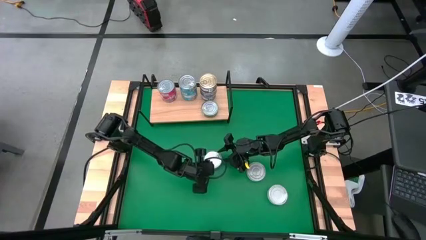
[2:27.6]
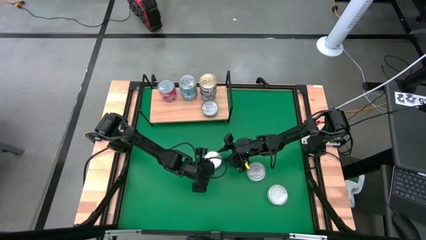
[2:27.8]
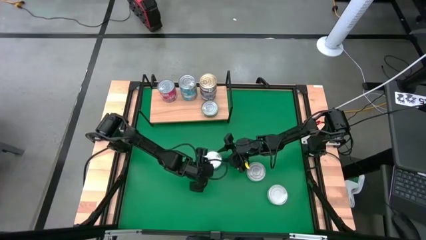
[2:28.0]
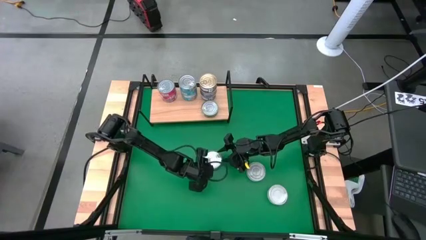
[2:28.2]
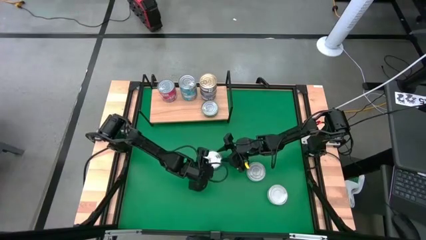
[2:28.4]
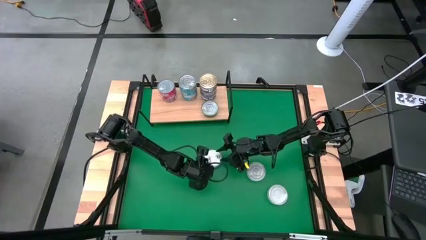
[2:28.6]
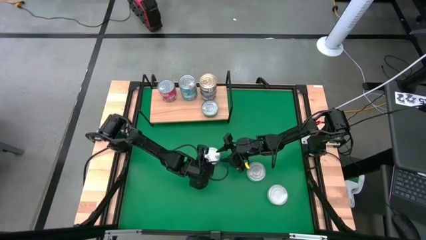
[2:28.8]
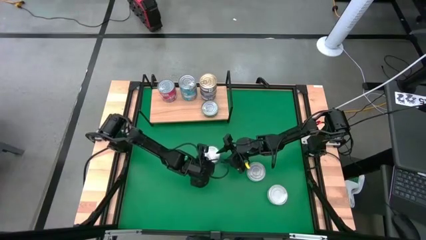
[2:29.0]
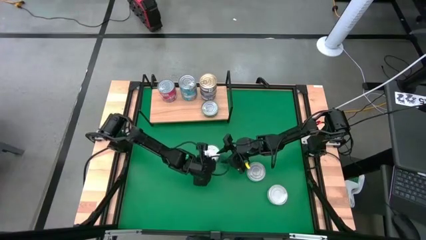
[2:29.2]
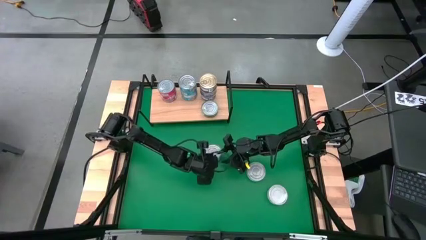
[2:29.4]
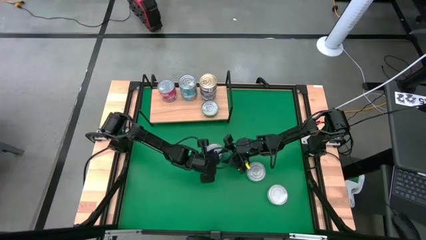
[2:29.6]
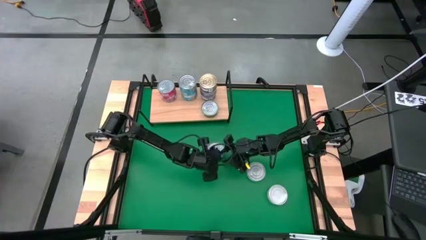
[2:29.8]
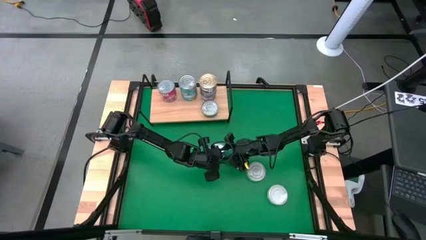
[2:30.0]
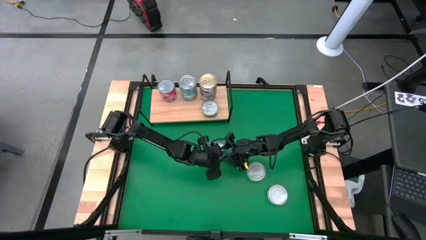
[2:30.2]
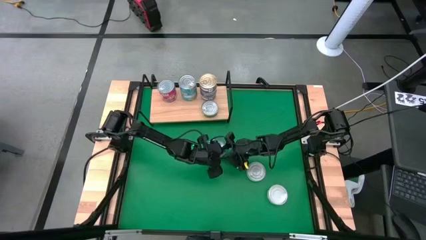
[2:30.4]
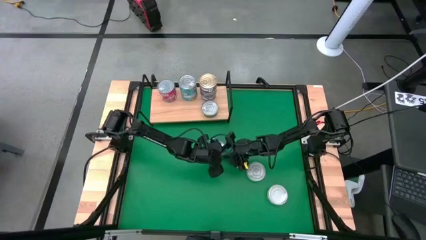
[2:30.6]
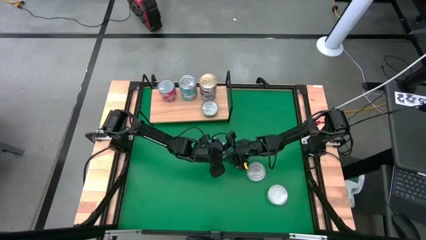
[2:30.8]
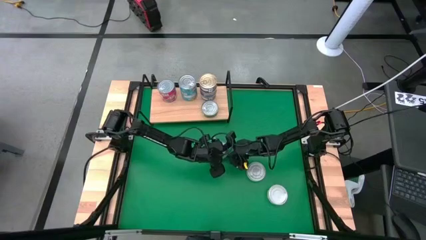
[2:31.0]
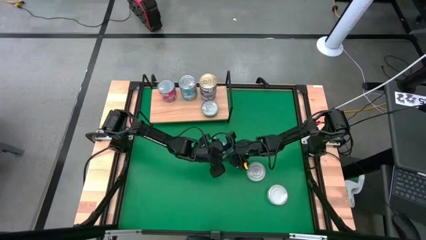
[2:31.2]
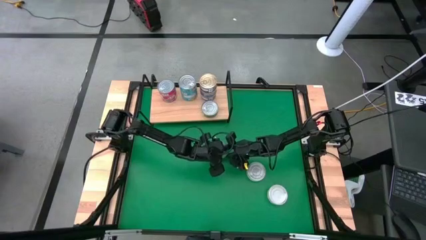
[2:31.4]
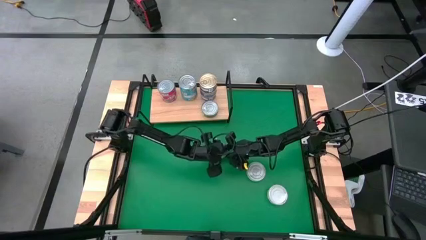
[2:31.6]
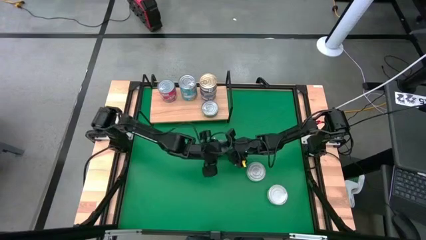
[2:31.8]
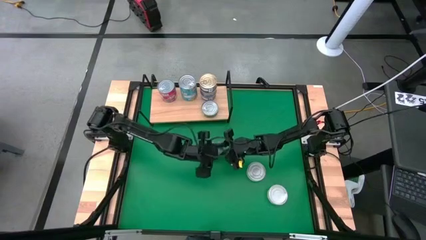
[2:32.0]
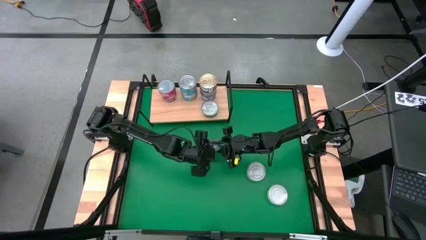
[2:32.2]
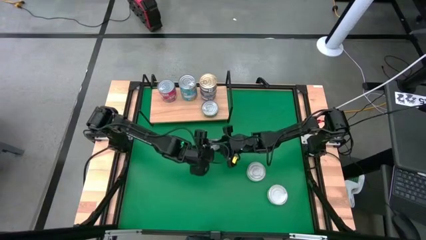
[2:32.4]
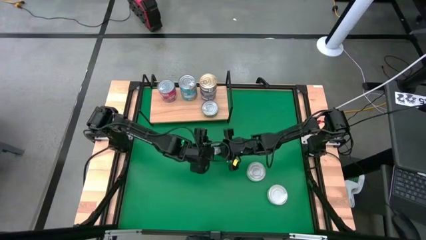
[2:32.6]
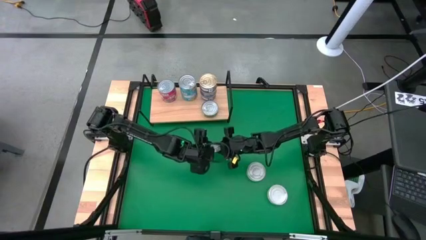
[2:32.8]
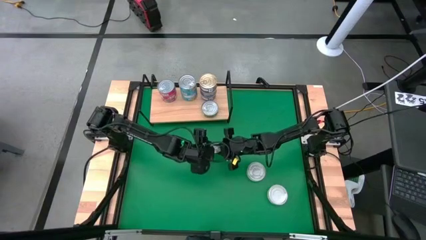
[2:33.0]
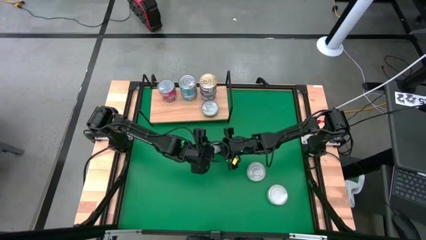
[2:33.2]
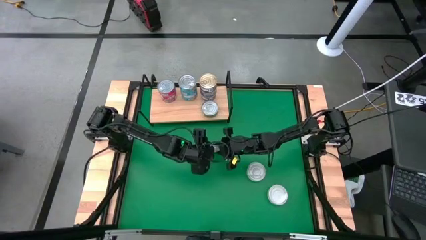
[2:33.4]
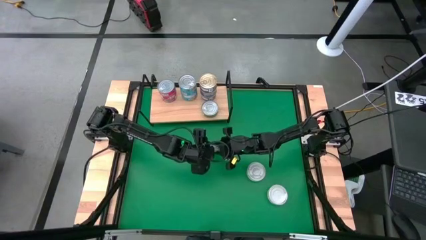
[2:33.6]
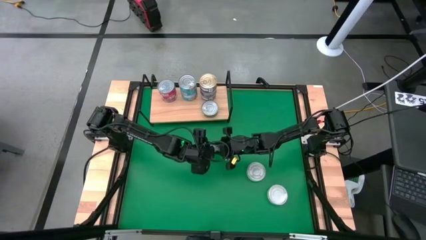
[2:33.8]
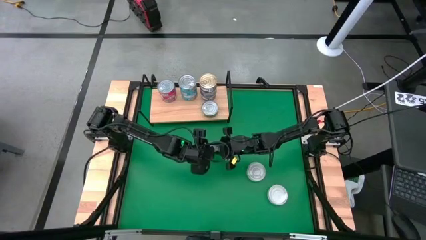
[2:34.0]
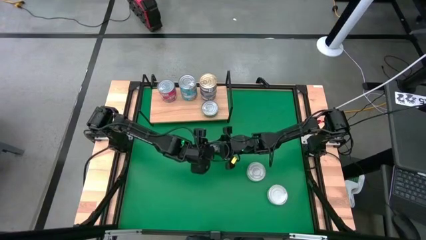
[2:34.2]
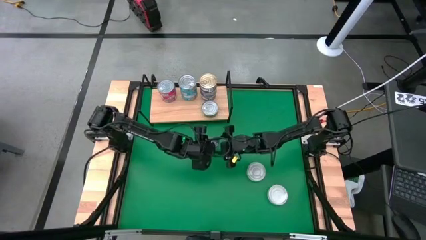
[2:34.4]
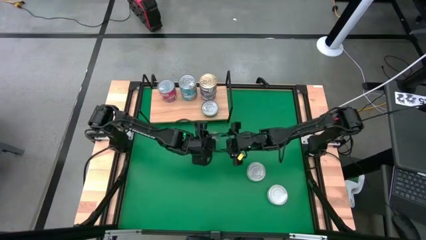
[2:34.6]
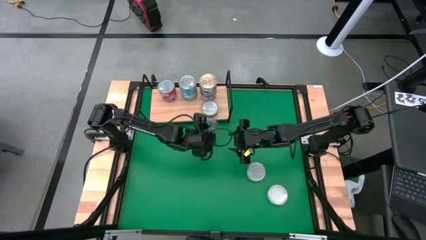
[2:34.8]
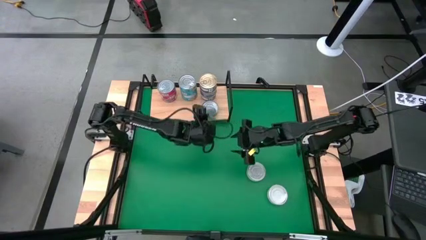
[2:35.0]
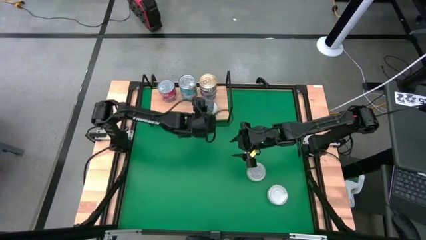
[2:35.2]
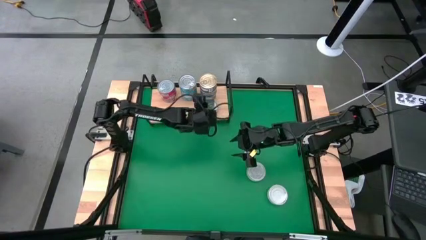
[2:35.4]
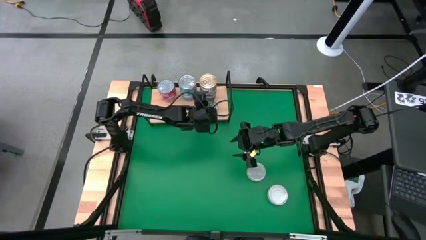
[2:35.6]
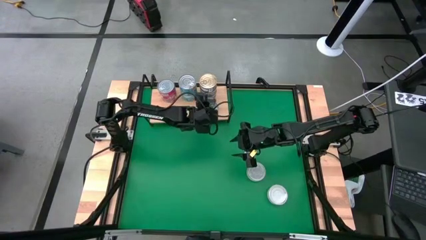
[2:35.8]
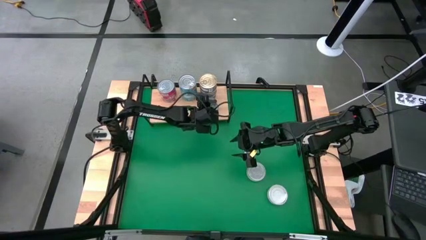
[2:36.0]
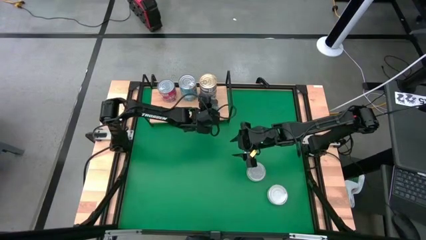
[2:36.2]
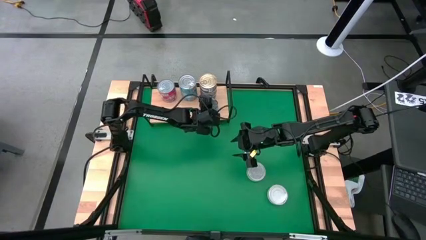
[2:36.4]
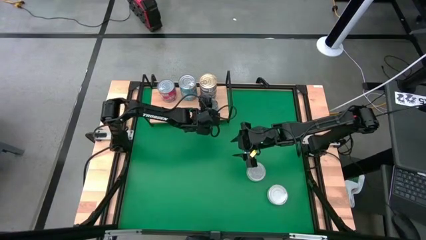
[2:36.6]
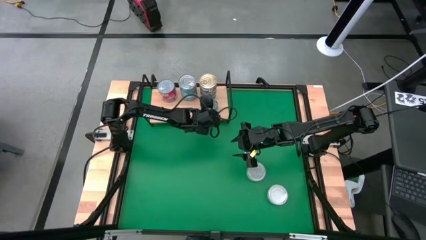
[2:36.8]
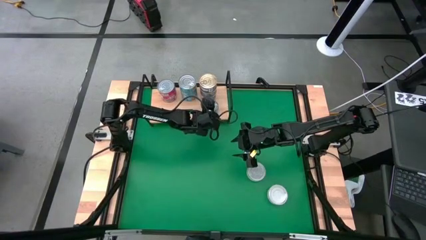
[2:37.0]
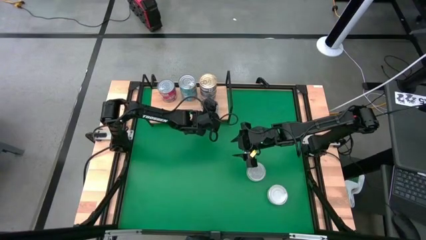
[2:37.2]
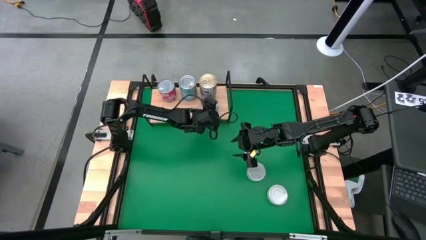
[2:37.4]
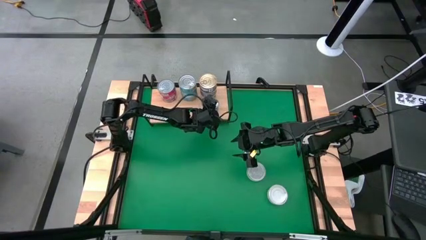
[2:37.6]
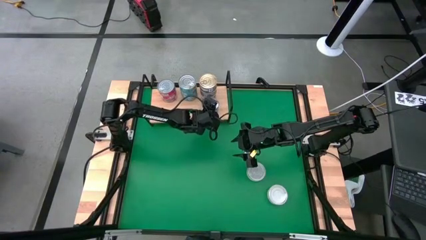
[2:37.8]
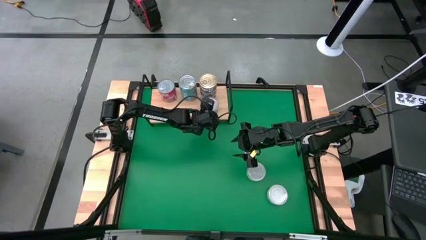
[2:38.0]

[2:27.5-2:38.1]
Task: Stack canned seafood by type on shelf
Stack the green tuna can on top of the other green tuna can on the shelf

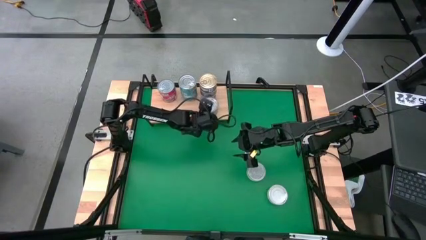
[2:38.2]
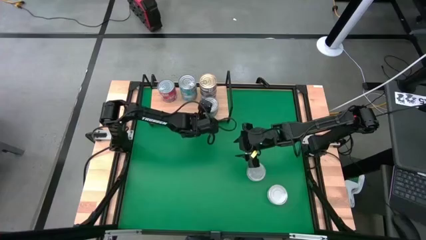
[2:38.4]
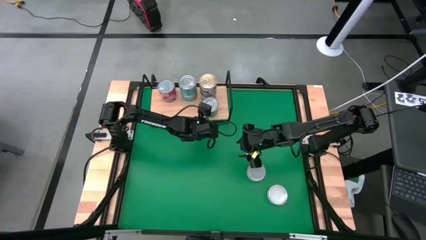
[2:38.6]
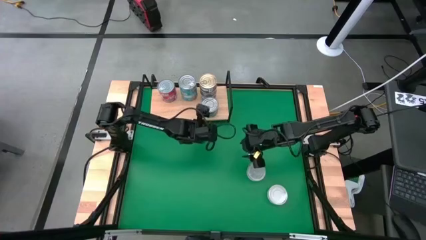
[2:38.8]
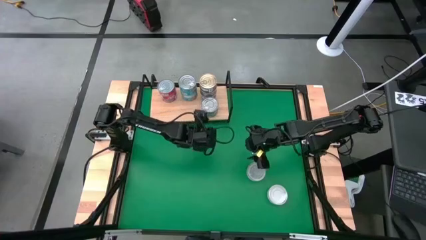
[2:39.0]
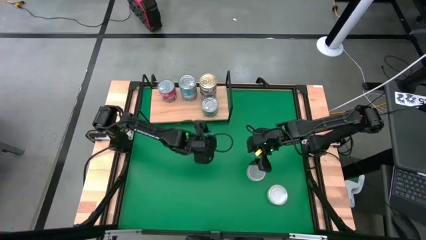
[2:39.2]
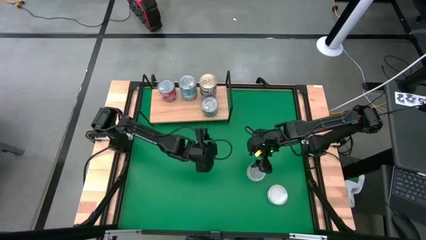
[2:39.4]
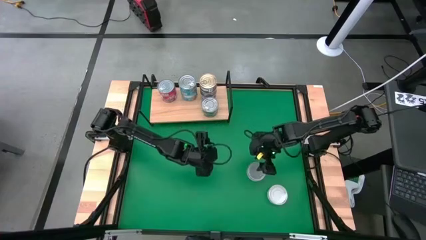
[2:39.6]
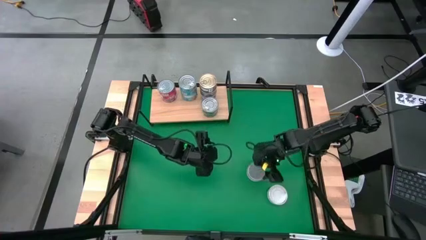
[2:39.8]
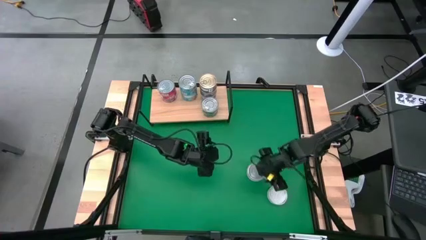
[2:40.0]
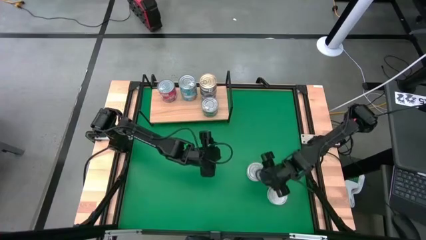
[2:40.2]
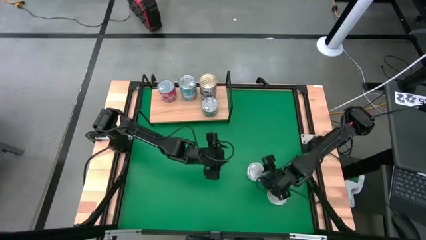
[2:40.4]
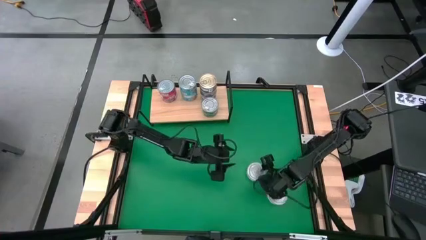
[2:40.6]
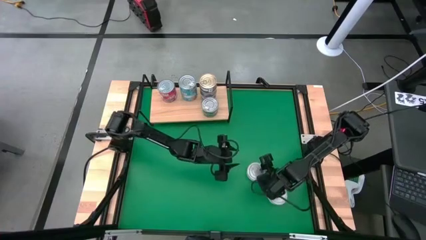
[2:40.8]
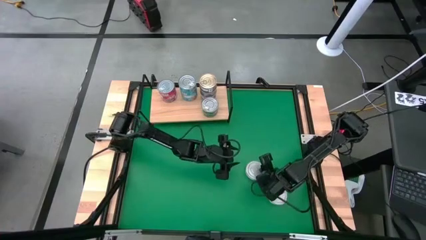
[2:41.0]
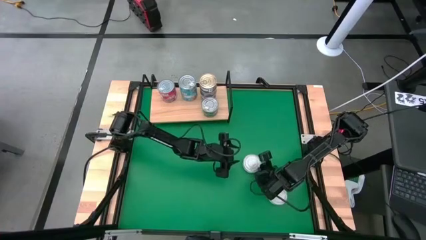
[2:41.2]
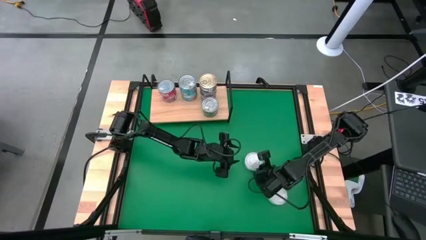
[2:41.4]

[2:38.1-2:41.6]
Put the green white tuna can on the shelf

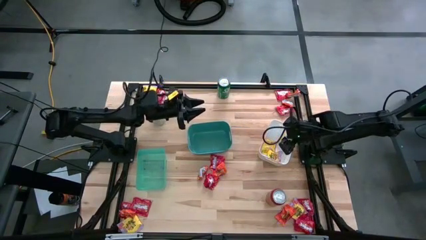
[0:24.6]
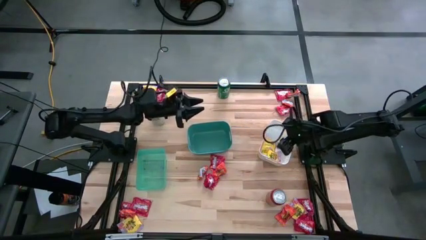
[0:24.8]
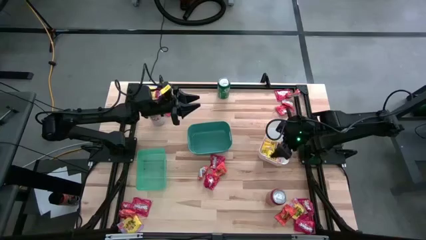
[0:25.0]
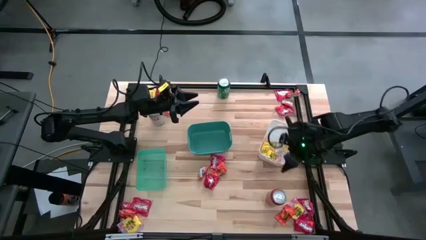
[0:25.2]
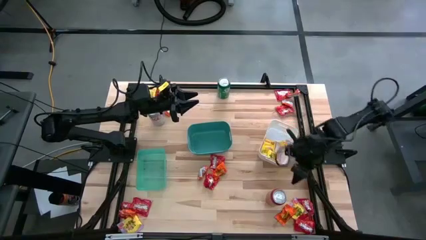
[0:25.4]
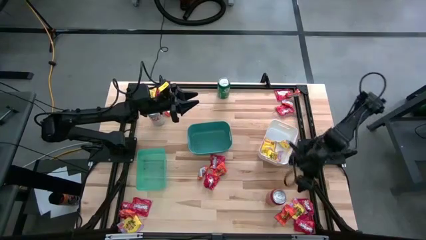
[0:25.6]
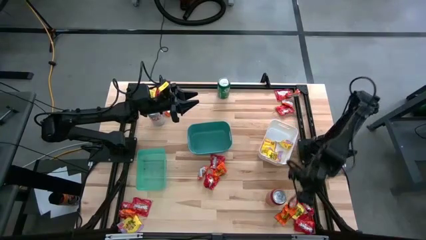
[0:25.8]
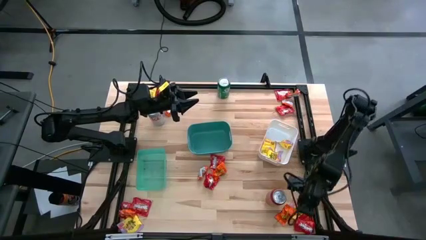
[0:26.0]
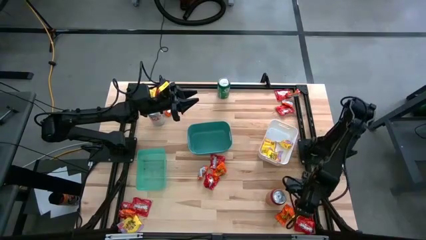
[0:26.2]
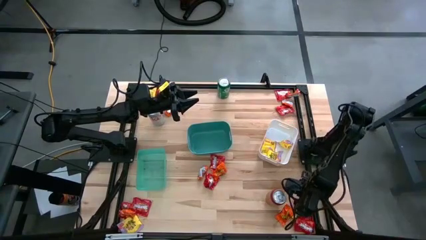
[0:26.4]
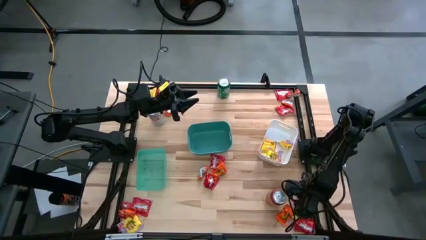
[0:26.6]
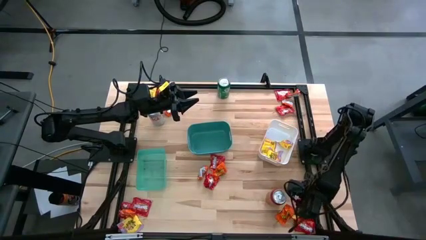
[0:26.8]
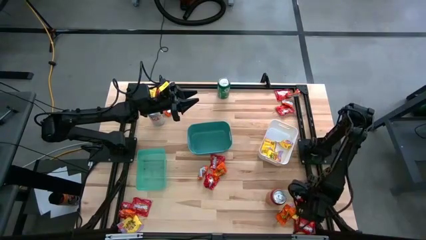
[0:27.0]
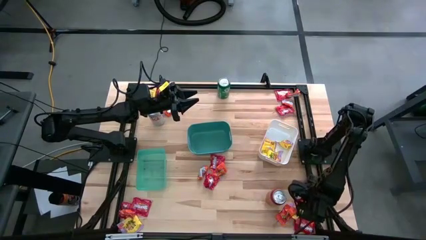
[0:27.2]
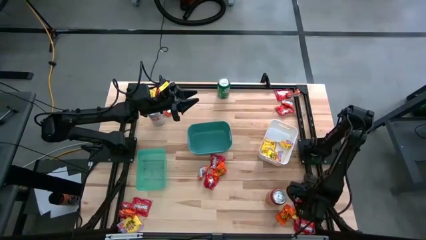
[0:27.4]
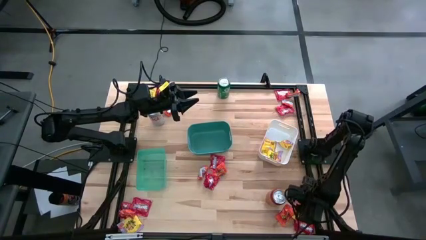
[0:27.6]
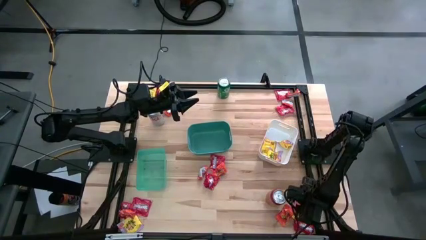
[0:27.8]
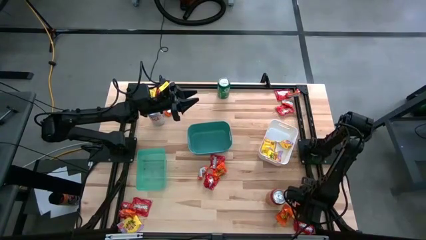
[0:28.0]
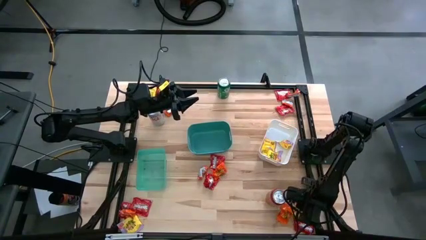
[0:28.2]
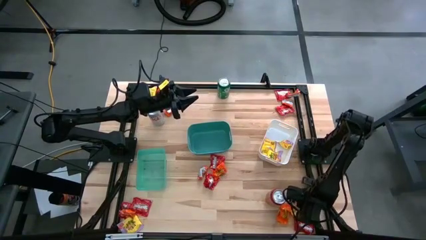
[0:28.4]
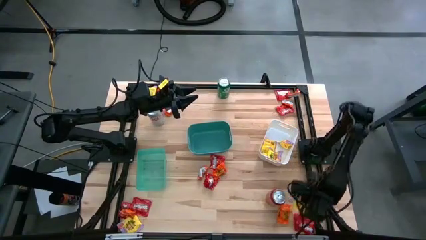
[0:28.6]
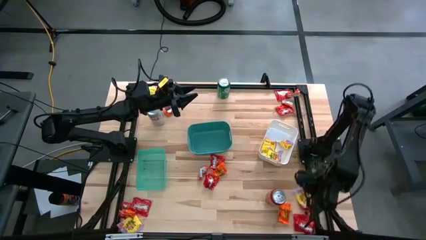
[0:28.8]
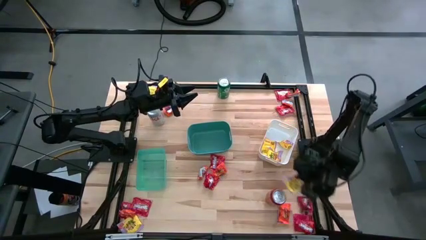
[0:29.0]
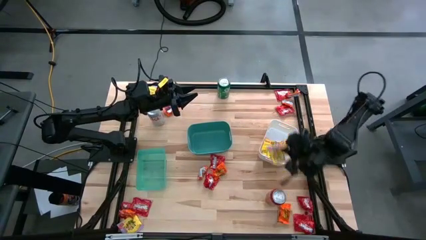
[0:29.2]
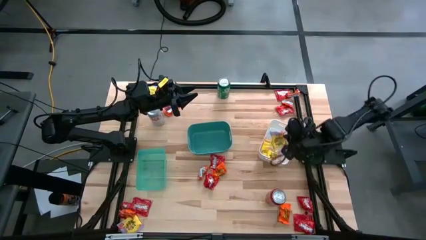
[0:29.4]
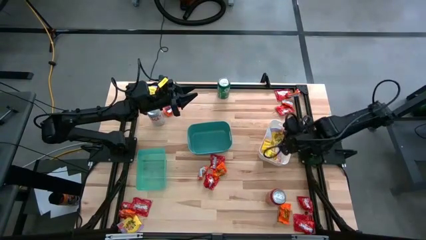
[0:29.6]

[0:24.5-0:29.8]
Task: Sort candy
Put the yellow candy into the white bin
